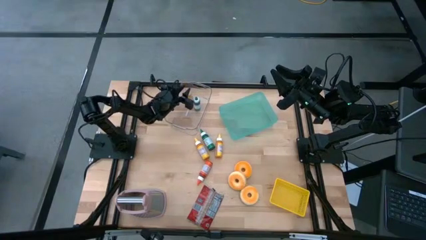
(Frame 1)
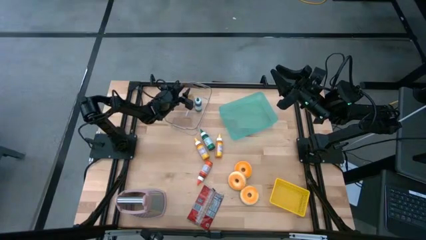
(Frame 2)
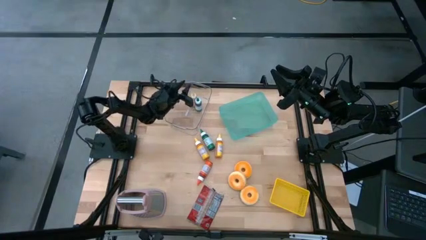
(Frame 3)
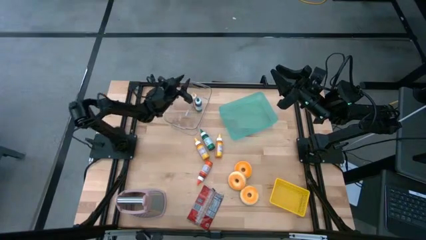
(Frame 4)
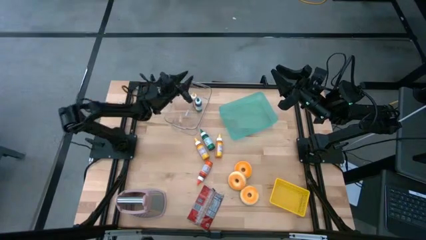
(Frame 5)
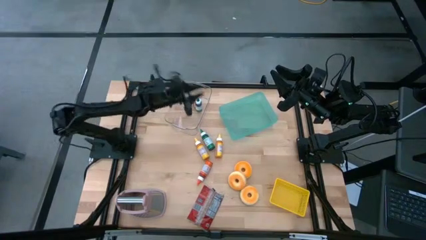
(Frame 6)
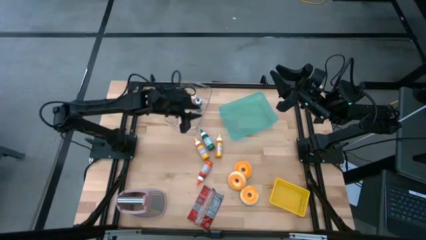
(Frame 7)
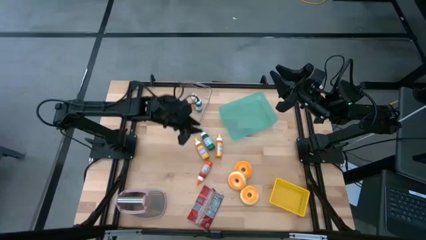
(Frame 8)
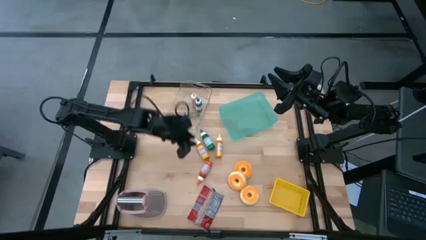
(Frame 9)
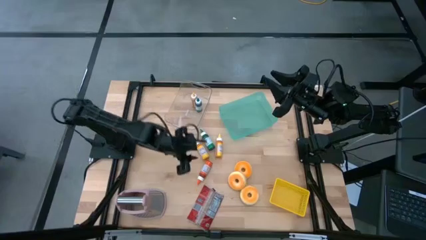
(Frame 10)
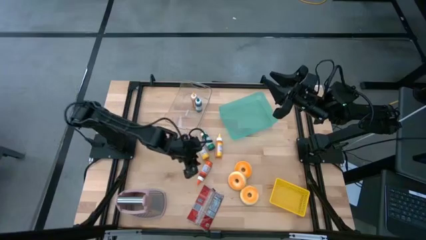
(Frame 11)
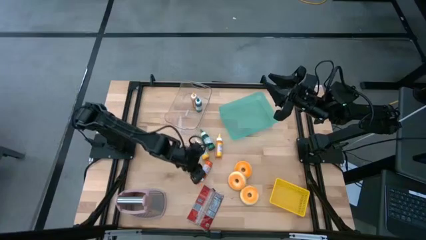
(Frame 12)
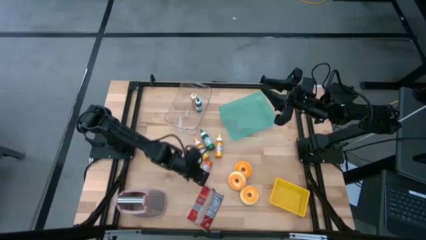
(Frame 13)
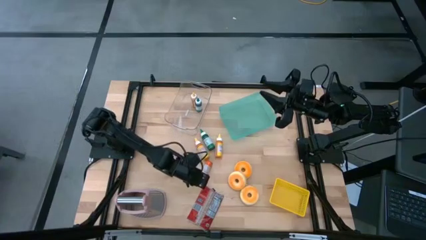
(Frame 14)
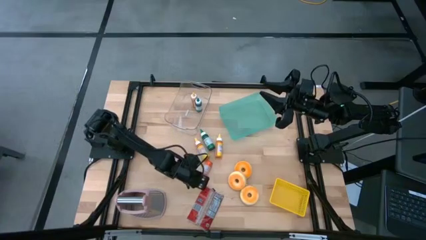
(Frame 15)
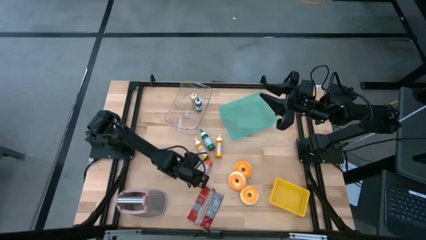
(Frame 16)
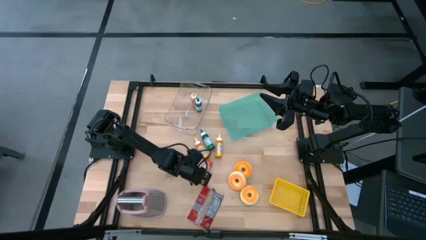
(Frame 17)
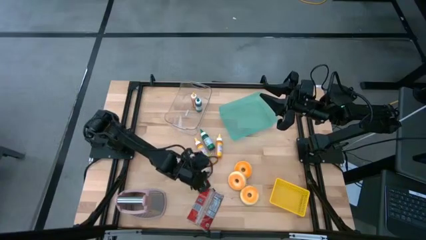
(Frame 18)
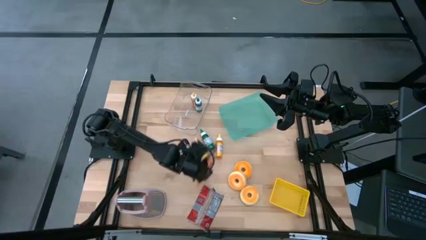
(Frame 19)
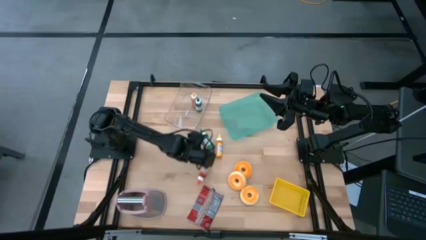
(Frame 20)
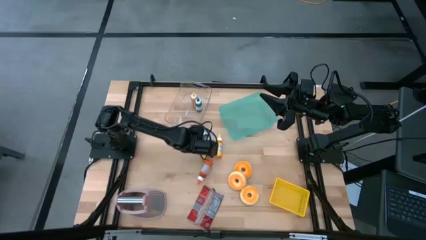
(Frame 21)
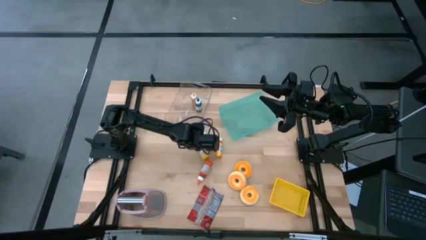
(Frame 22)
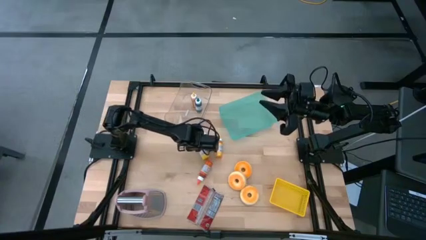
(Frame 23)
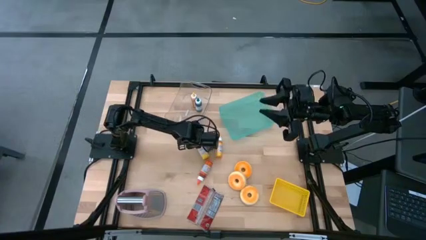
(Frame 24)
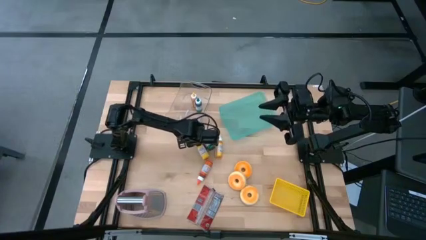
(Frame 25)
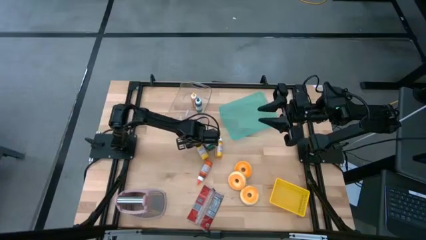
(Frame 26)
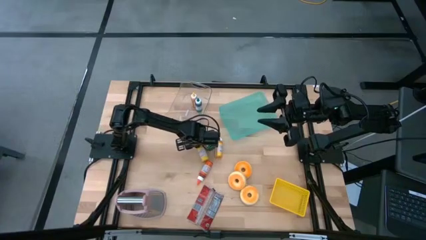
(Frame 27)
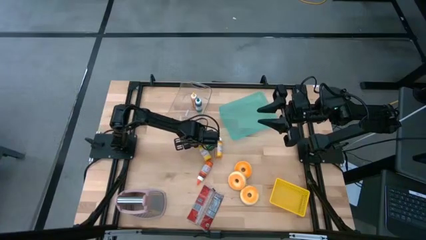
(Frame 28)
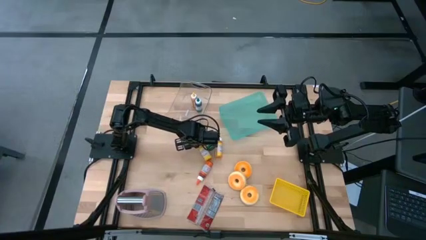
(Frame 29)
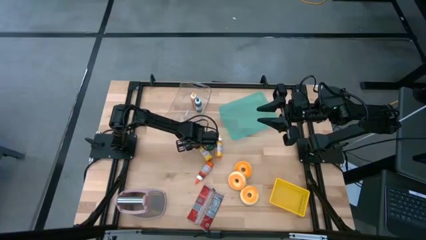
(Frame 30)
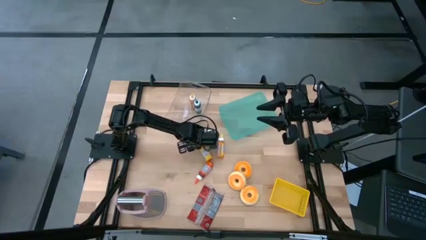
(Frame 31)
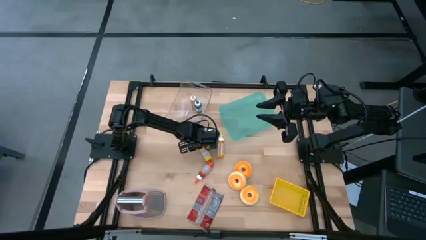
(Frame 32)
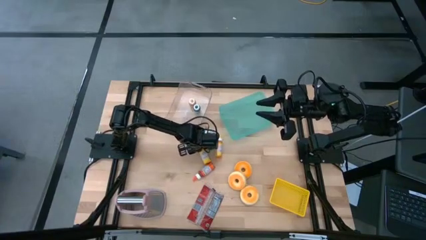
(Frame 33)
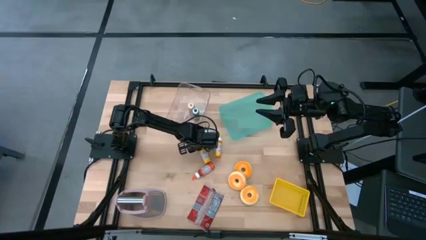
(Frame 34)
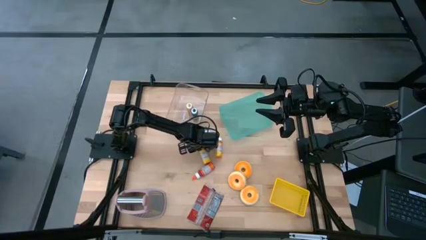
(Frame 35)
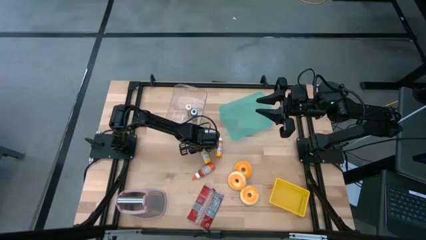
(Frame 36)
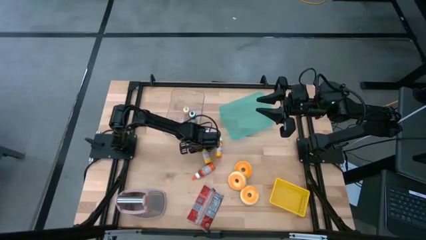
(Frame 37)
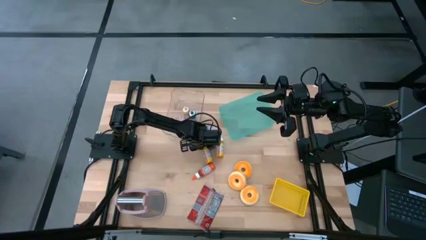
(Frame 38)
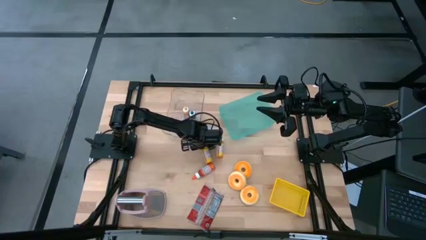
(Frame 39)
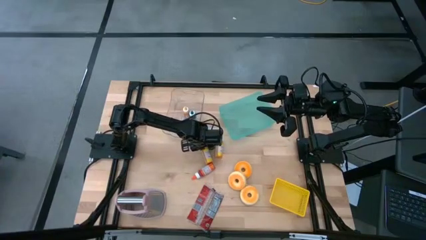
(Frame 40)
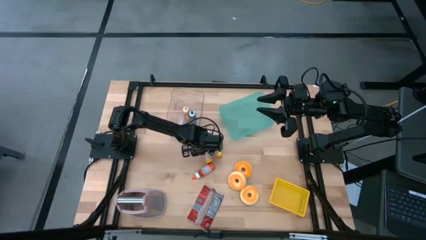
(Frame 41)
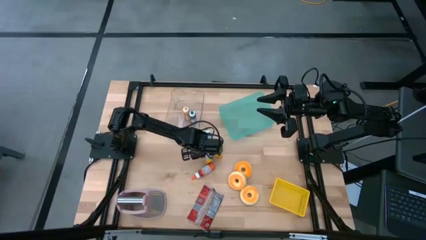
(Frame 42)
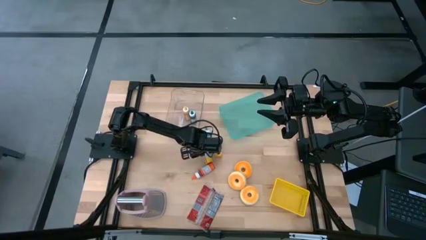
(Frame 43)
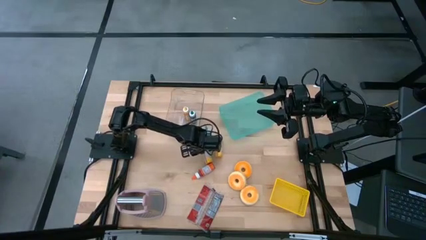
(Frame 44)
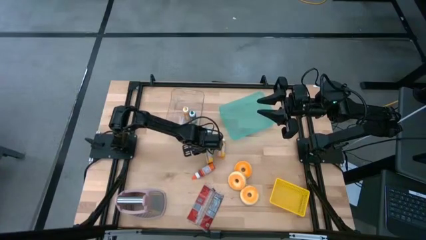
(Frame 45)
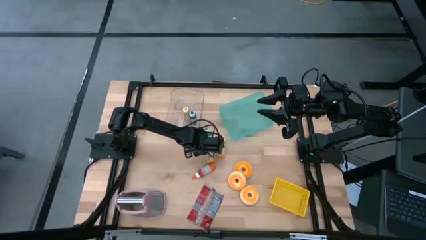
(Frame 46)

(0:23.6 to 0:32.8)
Adjust the left yellow food coloring bottle

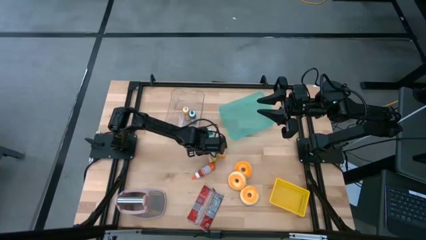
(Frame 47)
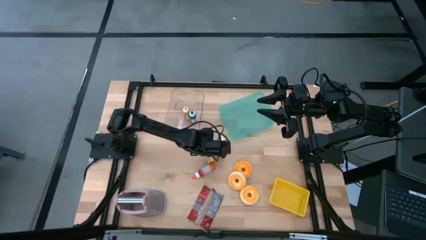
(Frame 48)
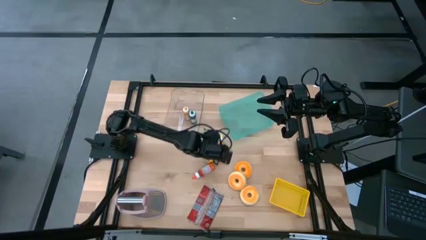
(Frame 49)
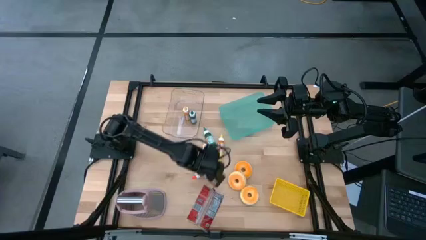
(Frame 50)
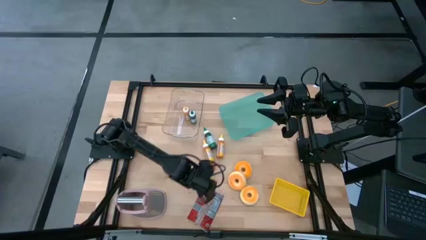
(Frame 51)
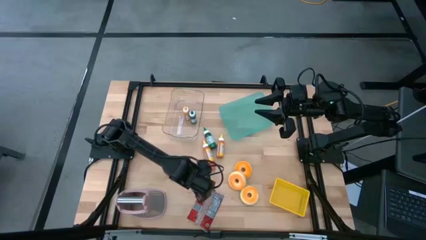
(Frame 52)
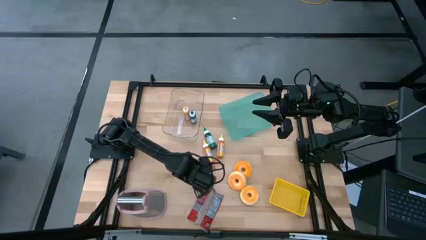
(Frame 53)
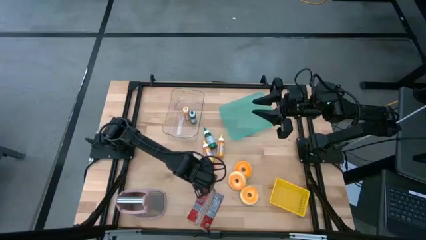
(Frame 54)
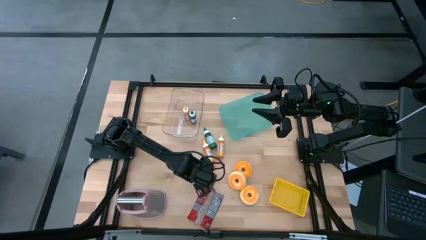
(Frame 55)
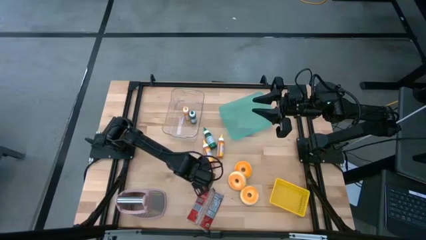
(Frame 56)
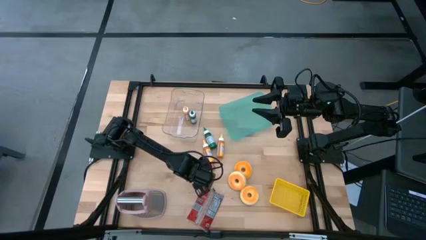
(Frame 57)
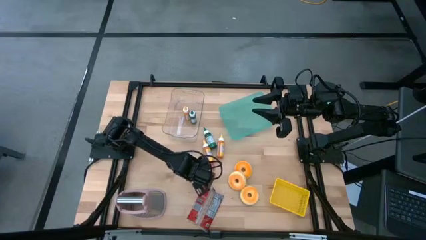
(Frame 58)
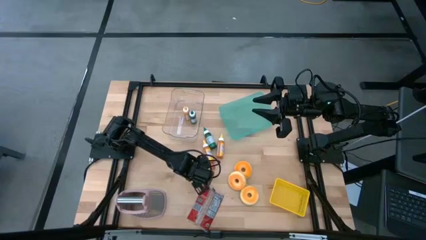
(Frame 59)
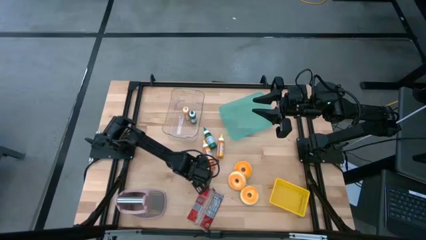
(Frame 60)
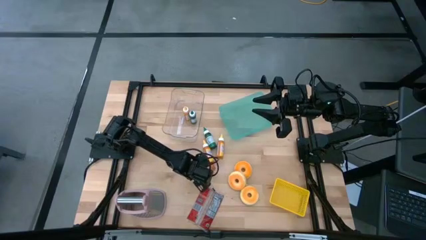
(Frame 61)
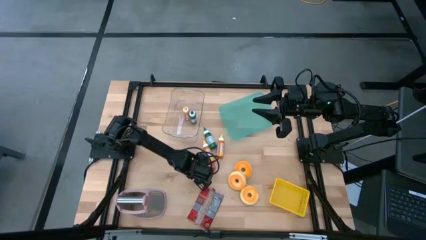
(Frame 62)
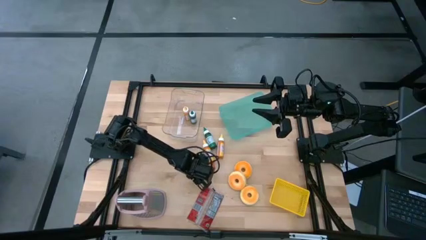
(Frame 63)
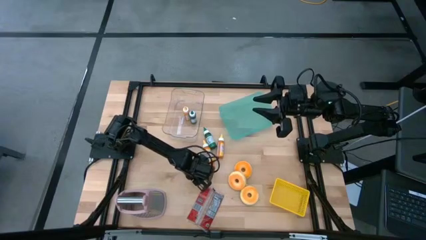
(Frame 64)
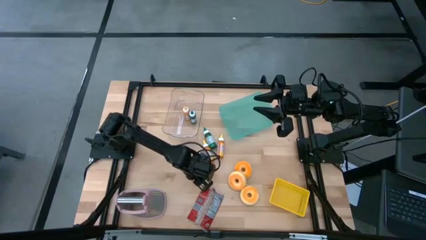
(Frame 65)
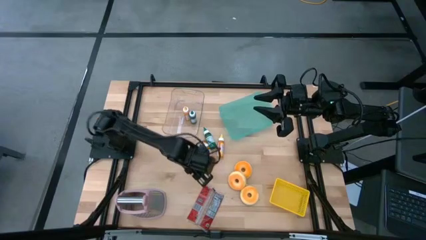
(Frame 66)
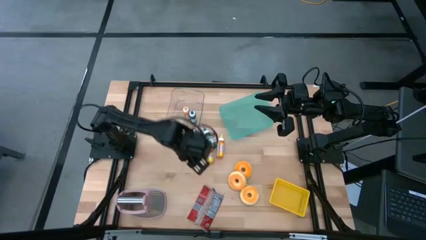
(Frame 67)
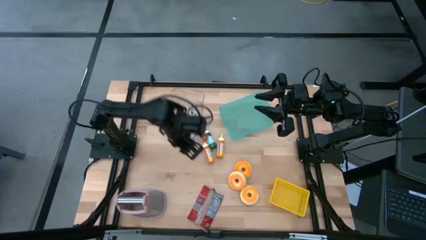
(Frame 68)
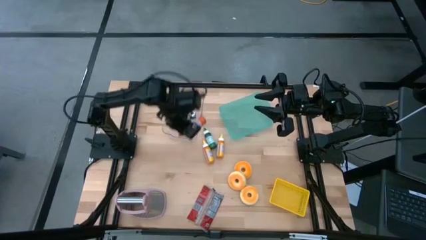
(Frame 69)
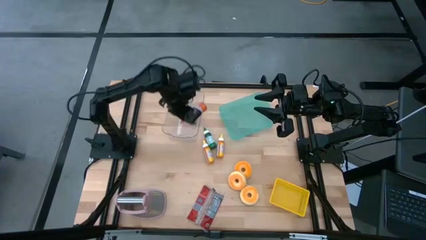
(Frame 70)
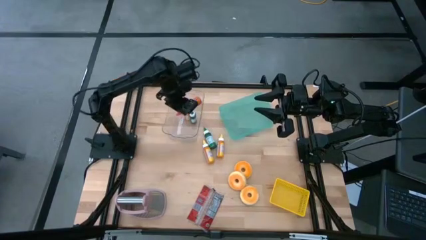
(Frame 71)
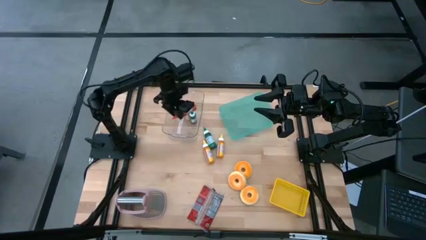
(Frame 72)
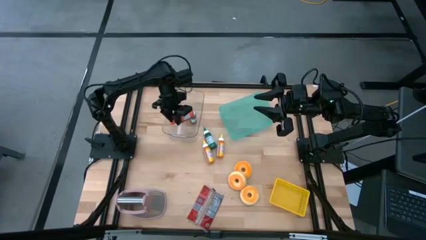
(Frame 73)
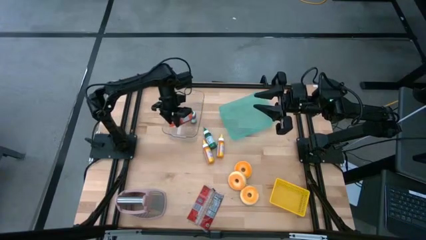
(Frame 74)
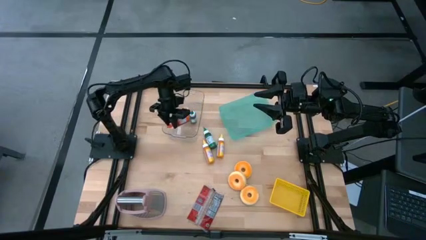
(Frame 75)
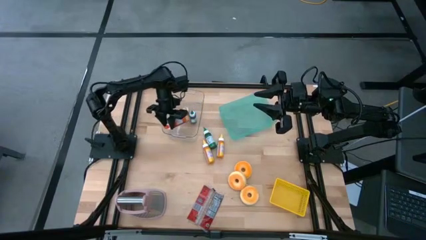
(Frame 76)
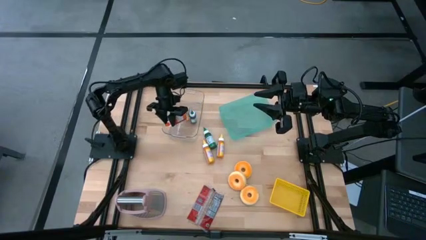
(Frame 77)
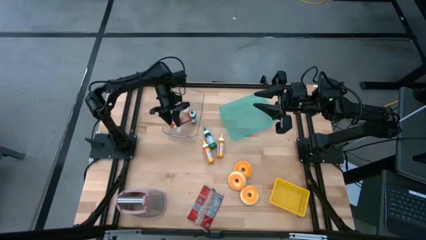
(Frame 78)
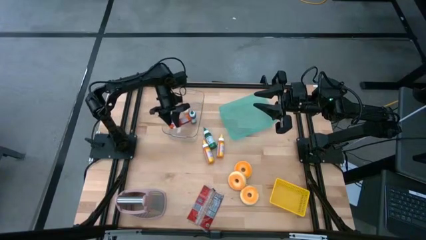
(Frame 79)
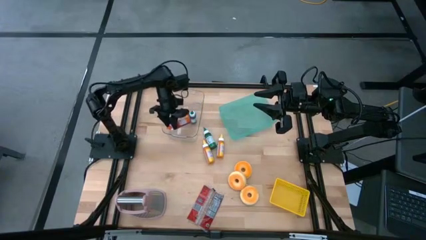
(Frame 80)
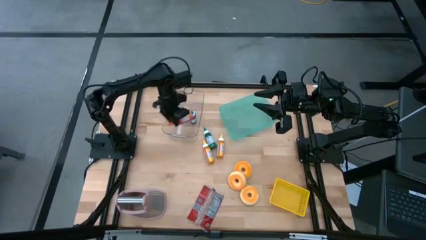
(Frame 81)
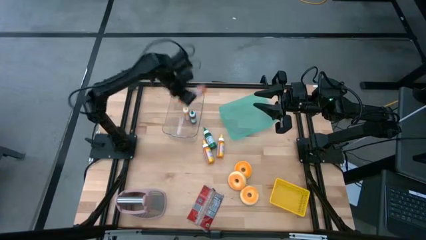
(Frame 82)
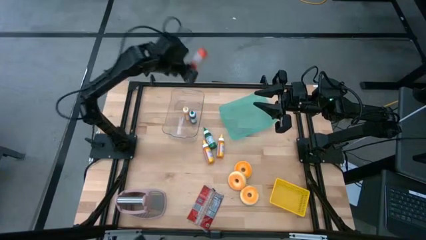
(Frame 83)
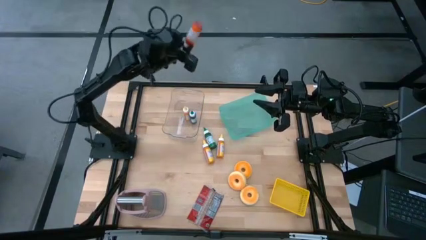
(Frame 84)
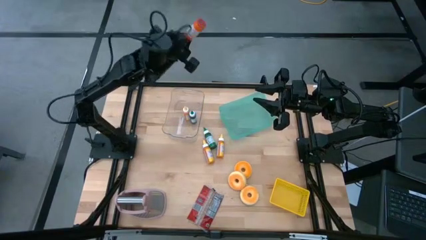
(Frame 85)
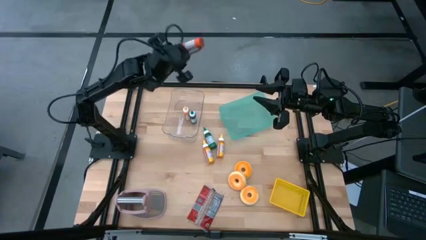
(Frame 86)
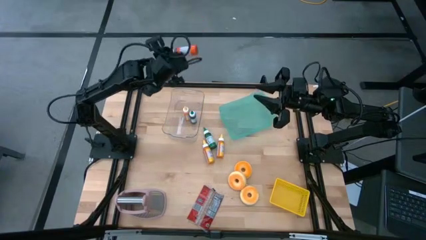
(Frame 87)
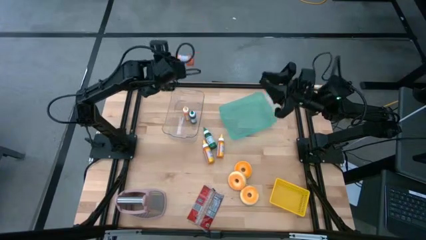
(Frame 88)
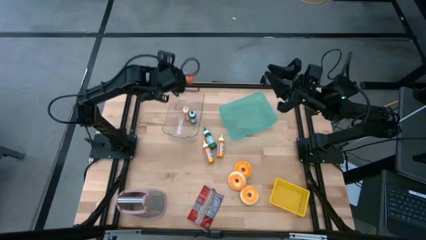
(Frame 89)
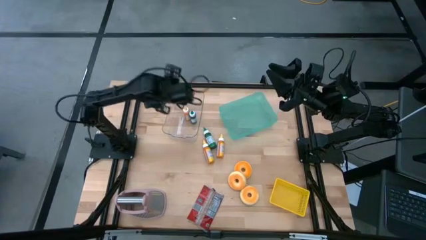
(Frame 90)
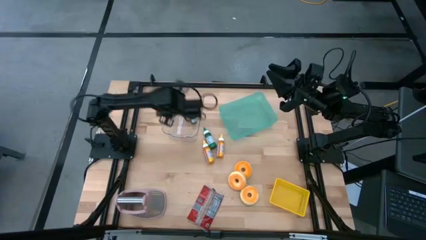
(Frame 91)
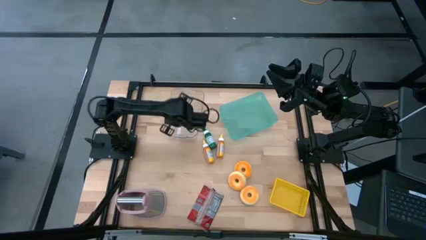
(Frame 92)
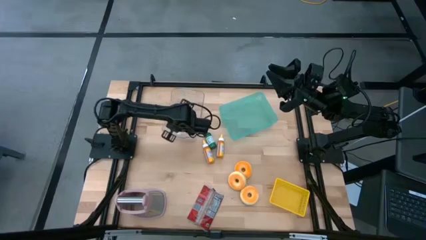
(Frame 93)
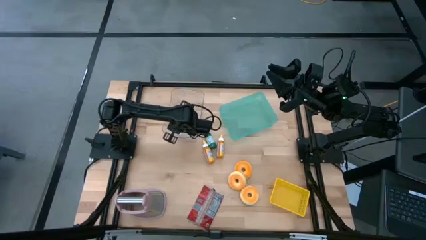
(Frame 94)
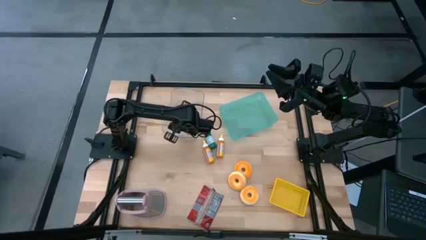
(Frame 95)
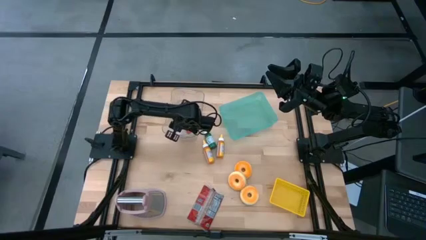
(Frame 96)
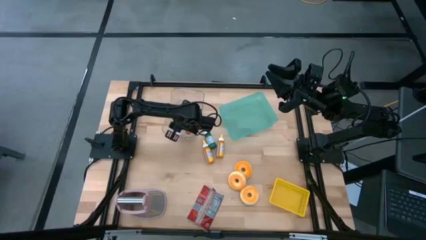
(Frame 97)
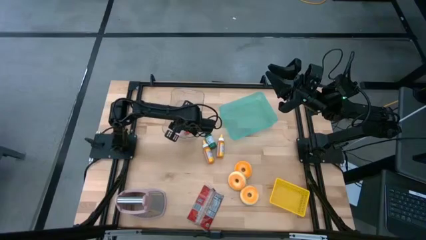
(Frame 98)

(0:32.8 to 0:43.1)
Put the orange food coloring bottle into the transparent bin
